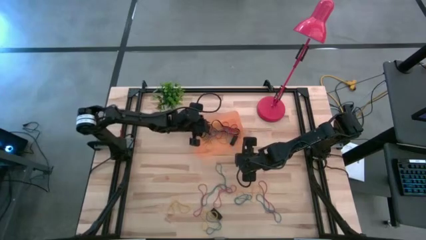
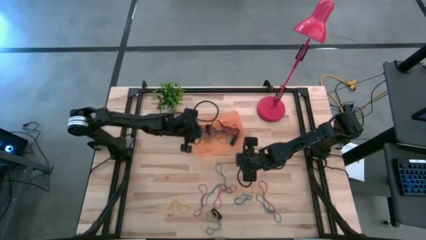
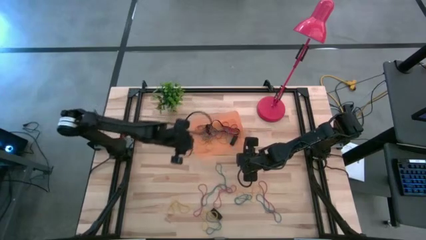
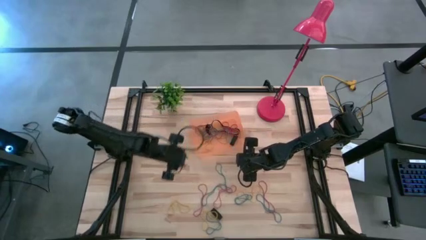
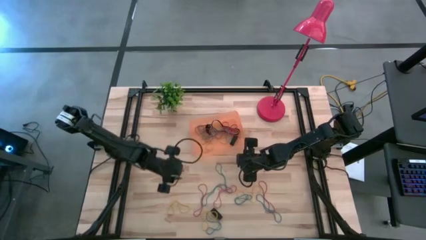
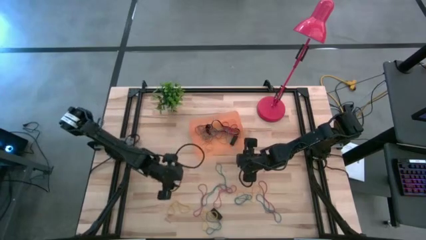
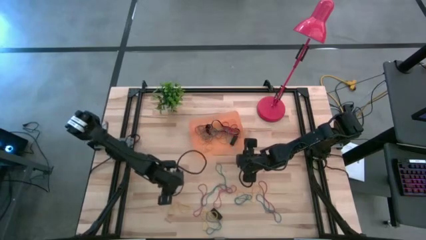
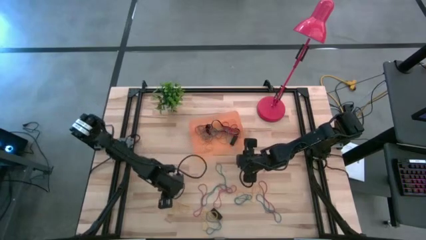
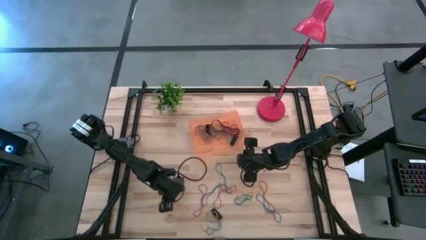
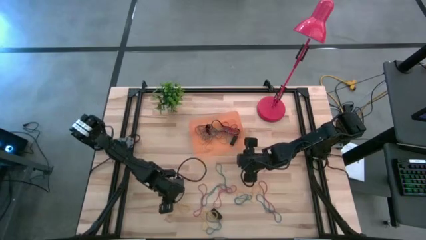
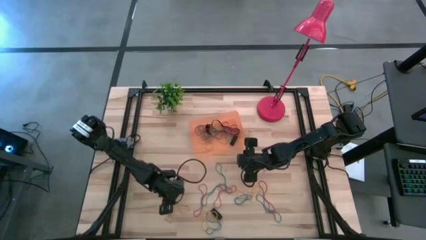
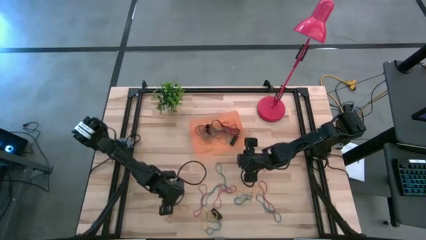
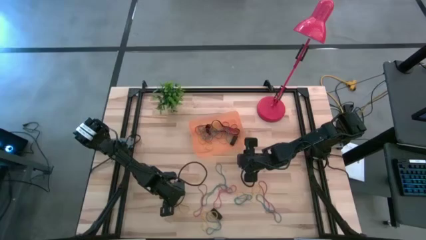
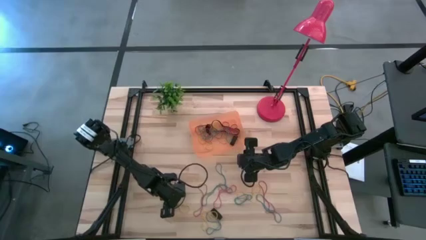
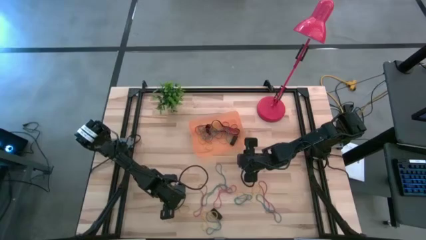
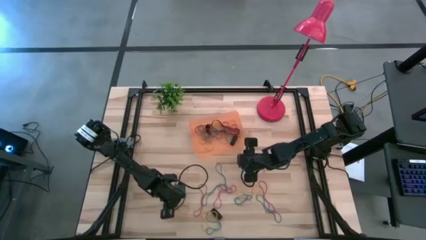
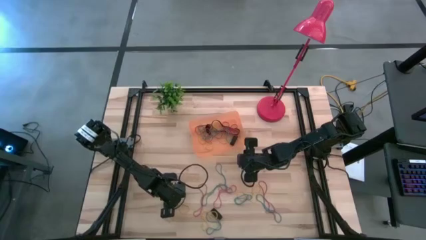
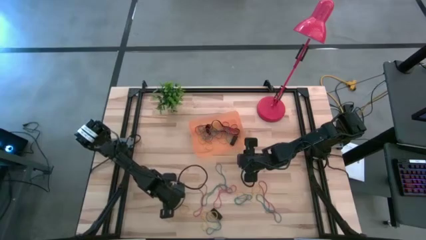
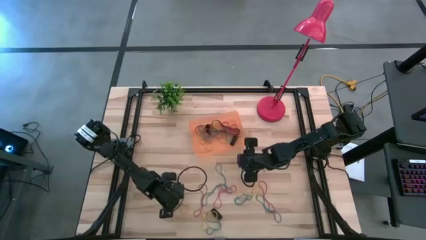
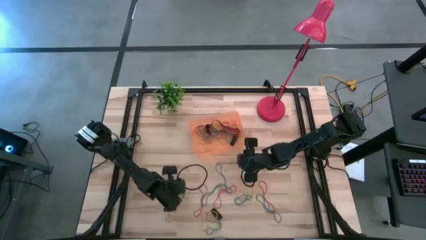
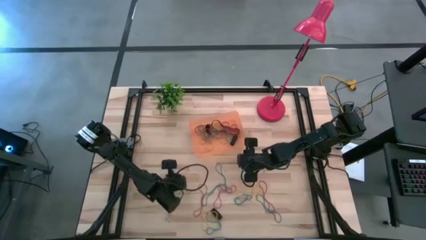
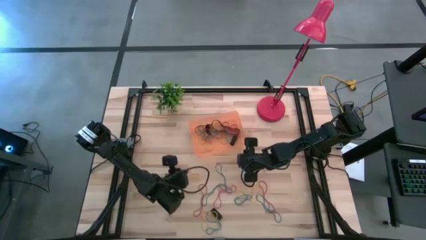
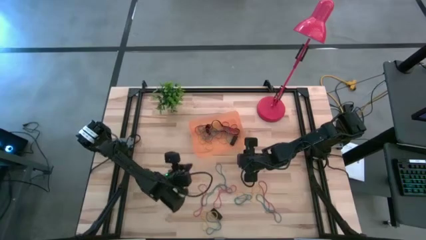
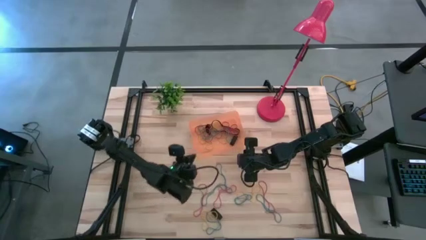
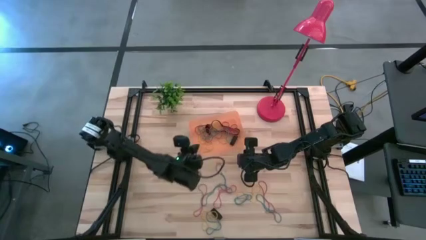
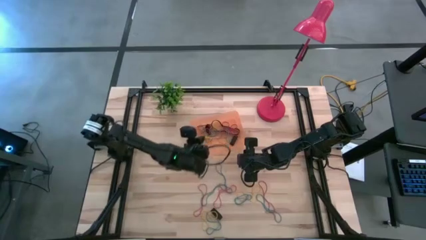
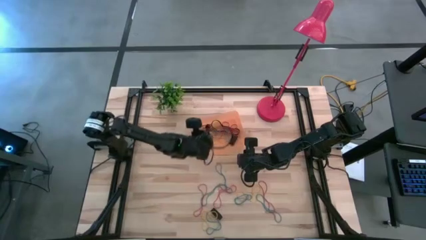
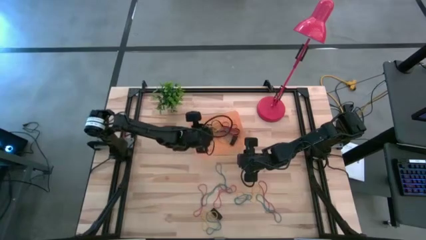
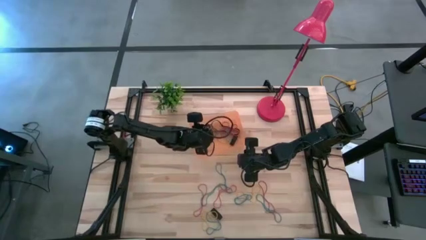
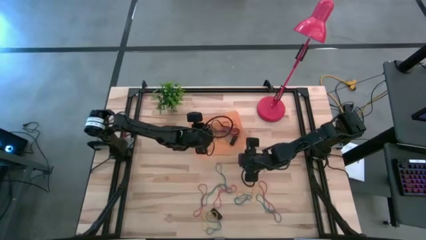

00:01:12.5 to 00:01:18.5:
Task: Pick and place rubber bands into bin
Put the yellow rubber band into the orange bin

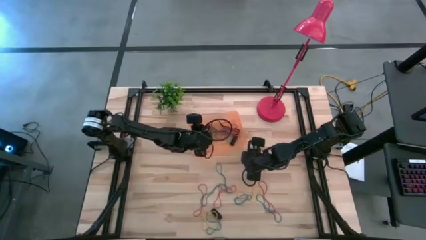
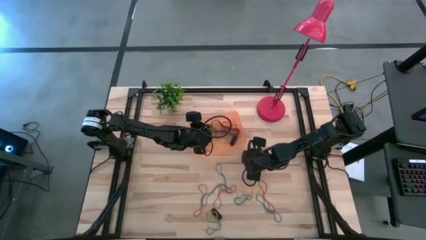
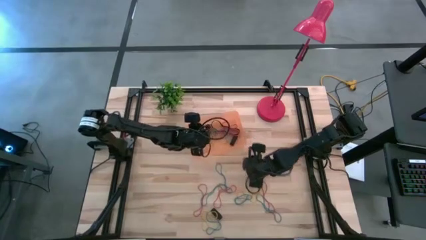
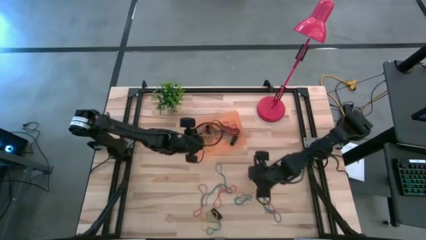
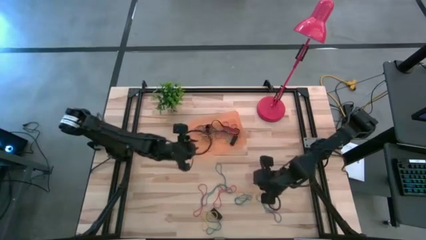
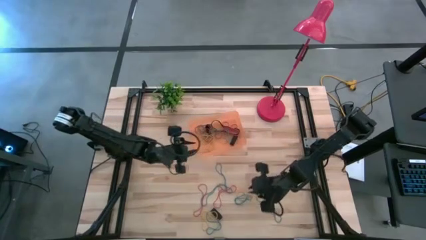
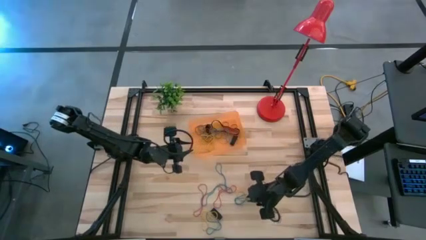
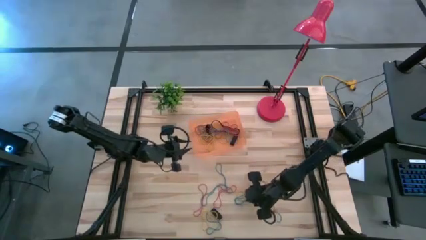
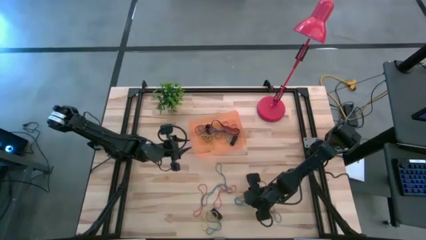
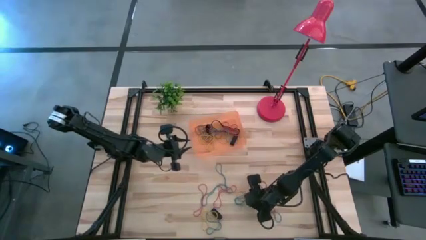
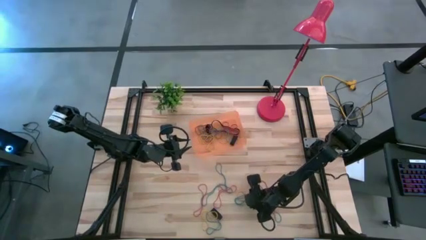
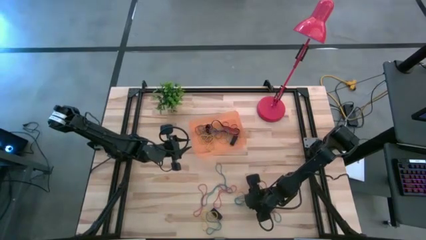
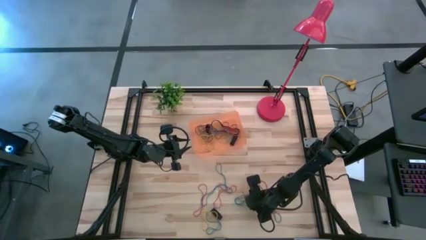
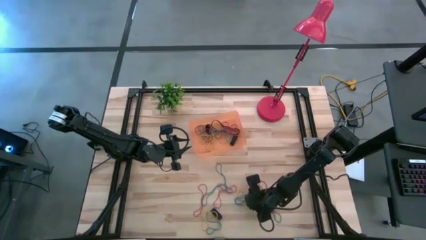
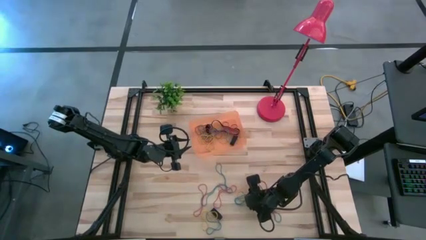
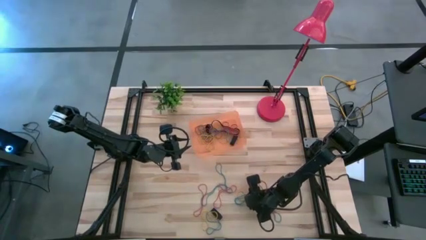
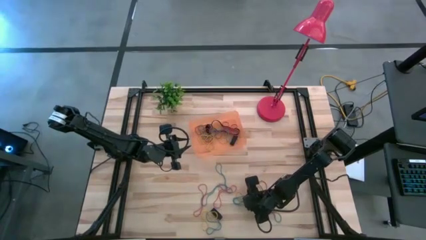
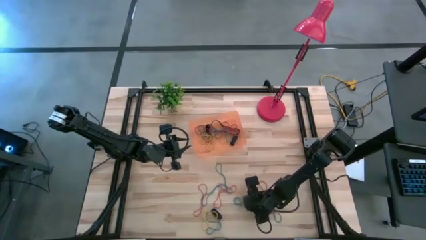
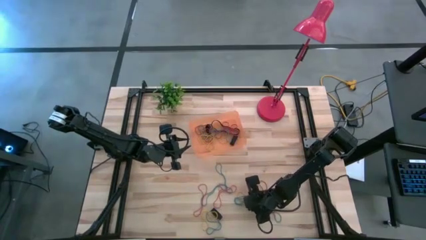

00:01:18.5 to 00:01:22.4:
Put the blue rubber band into the orange bin

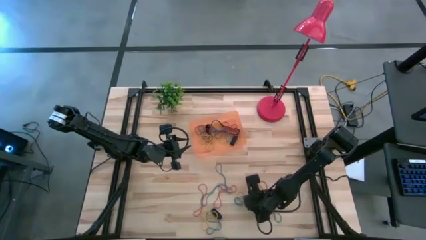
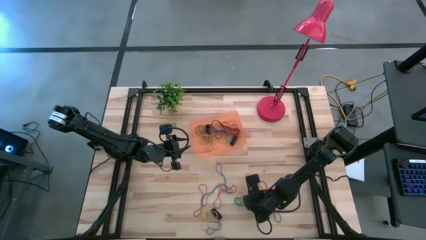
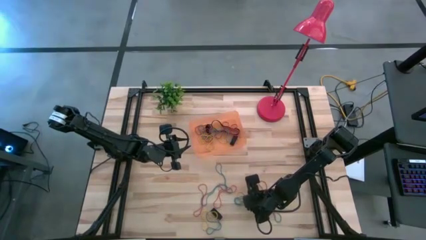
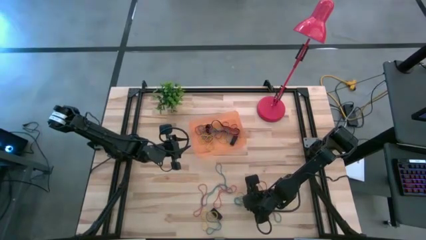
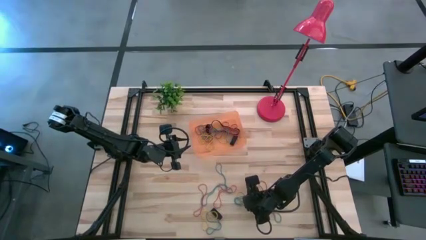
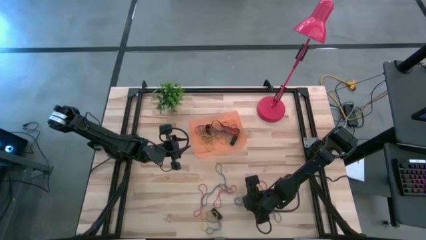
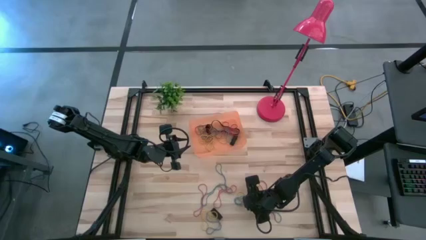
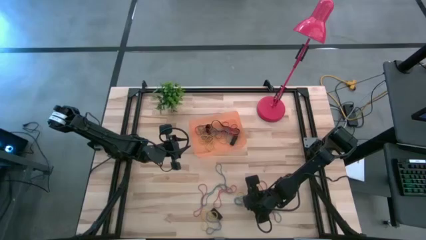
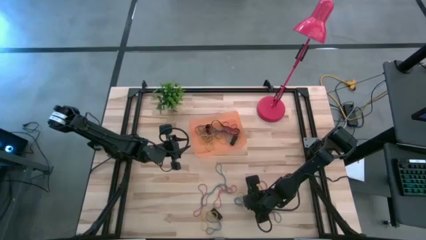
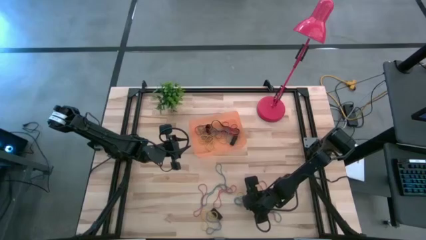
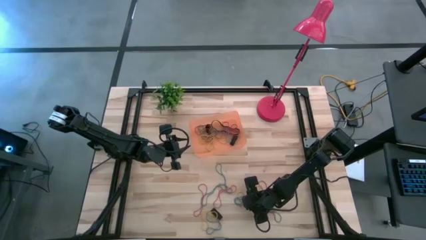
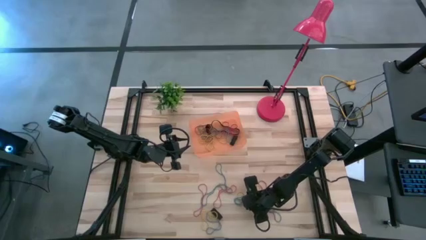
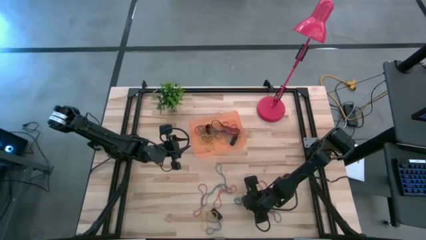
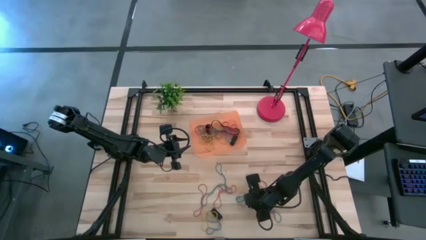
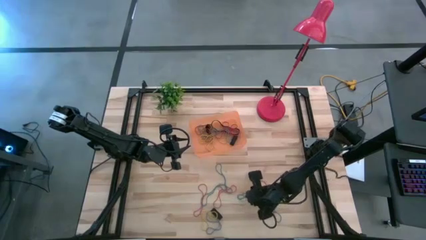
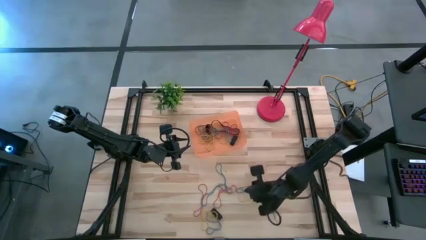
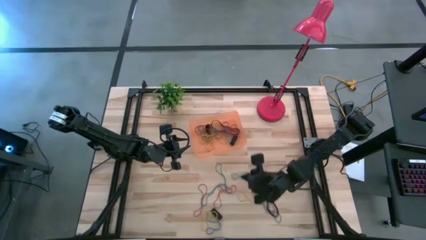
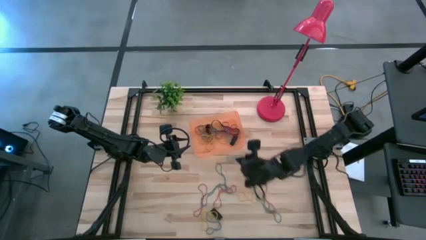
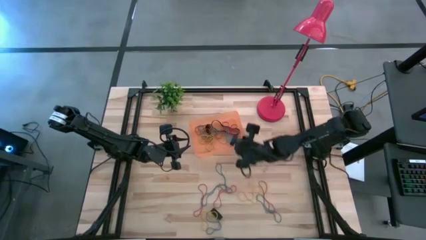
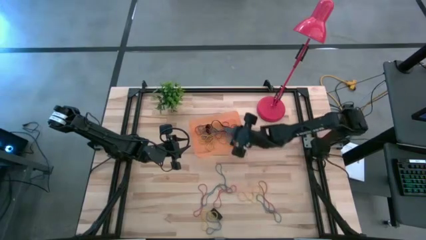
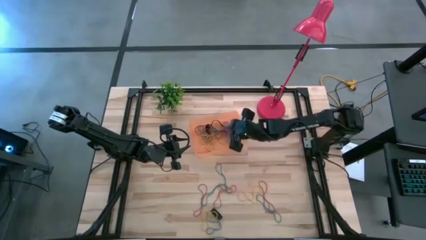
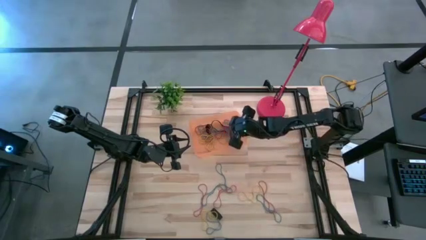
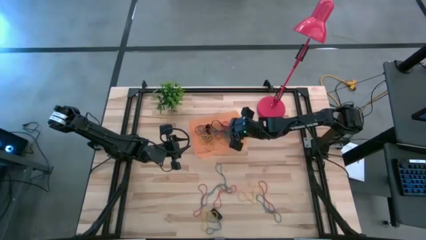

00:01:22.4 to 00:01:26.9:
Put the blue rubber band into the orange bin

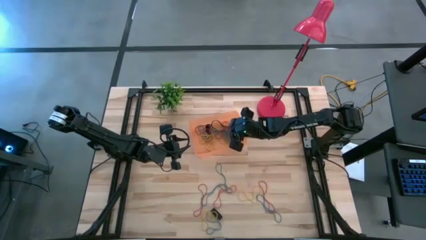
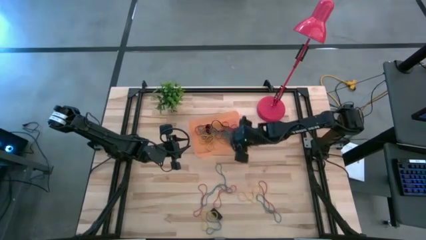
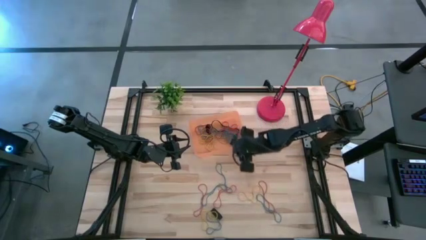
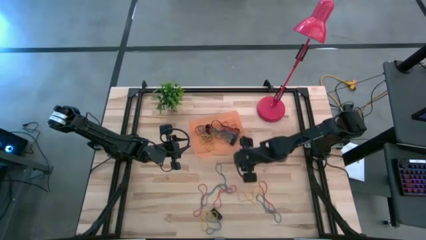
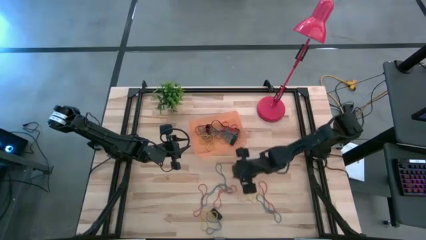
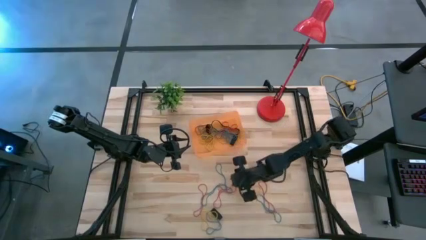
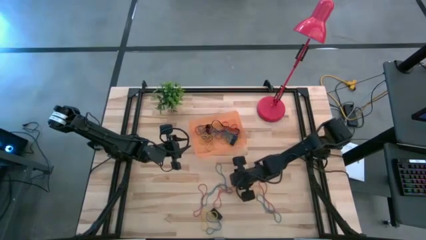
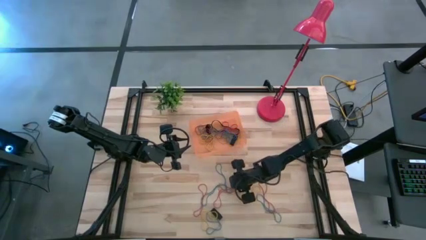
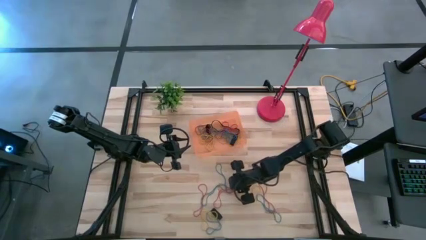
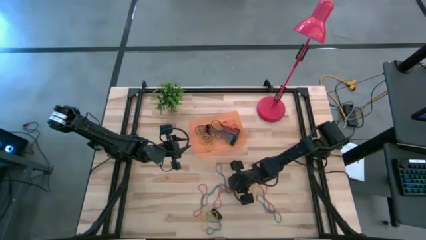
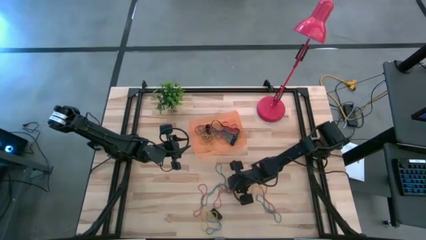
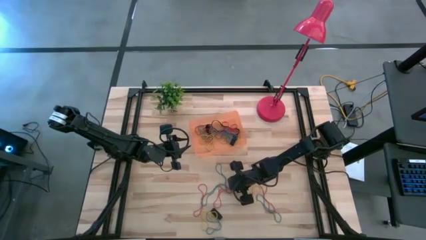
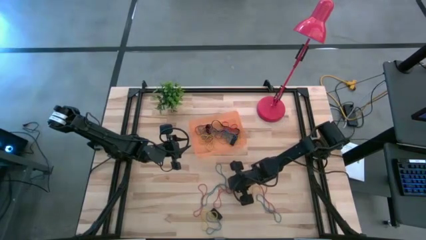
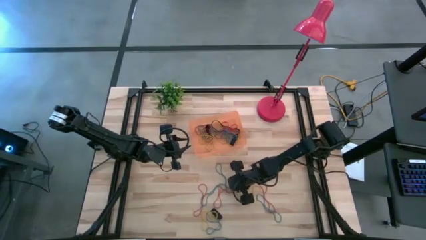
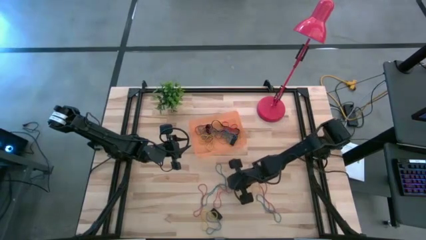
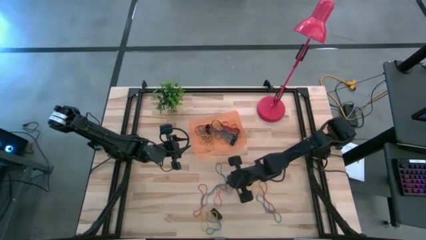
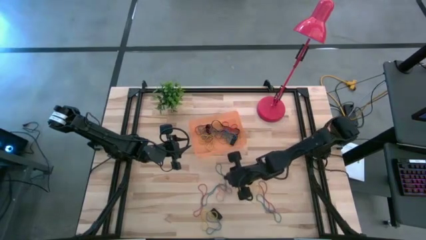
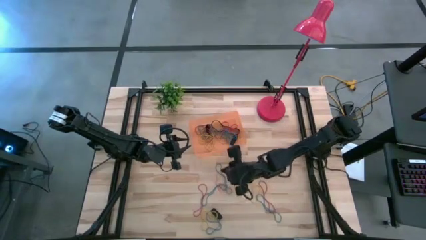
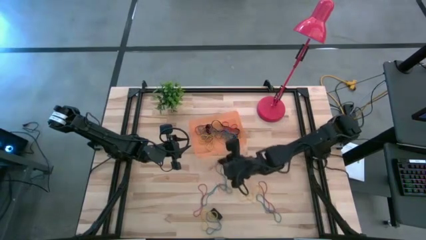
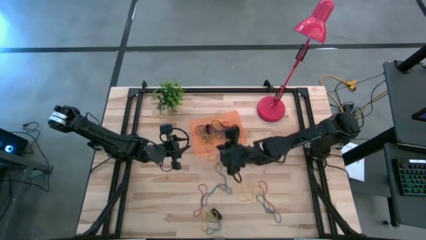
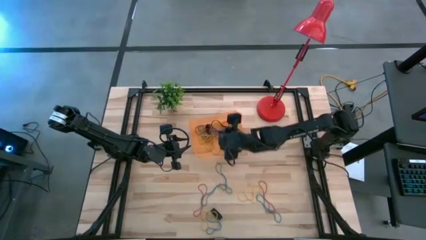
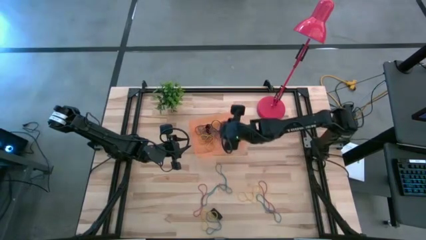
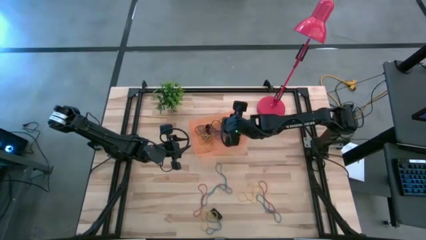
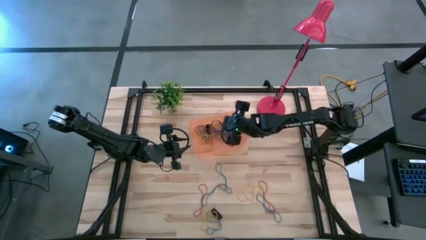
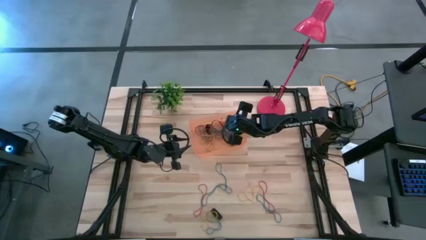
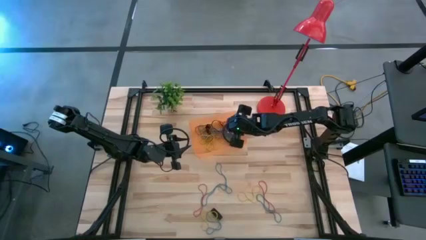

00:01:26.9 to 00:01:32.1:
Put the red rubber band into the orange bin
